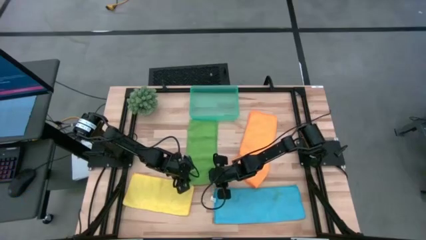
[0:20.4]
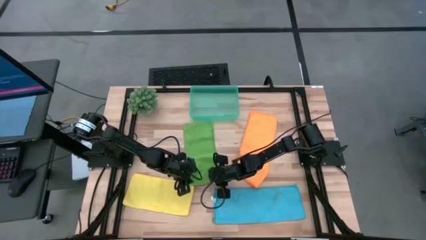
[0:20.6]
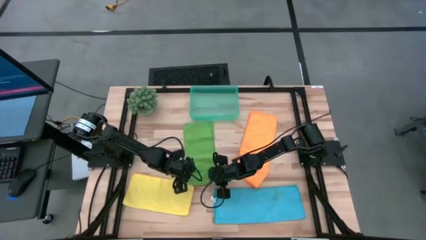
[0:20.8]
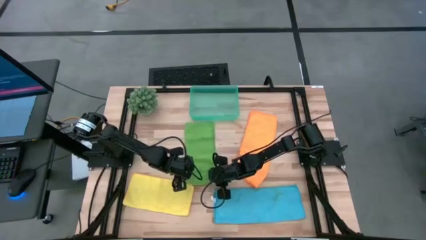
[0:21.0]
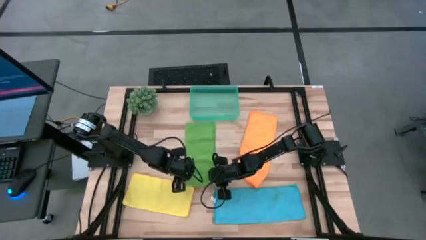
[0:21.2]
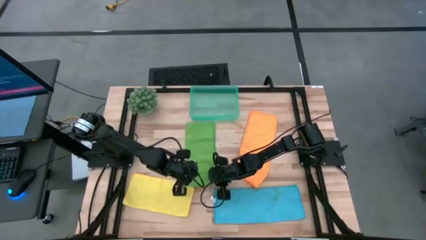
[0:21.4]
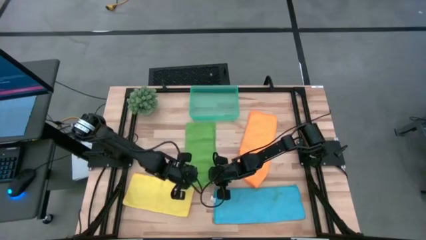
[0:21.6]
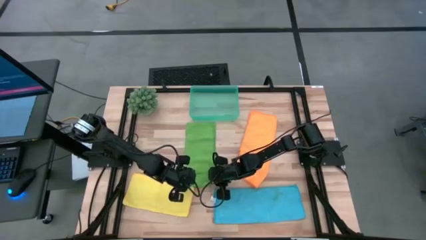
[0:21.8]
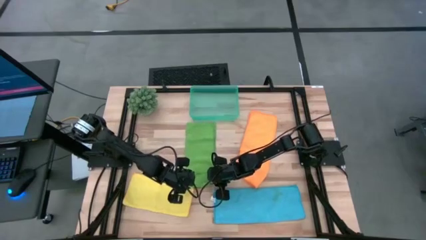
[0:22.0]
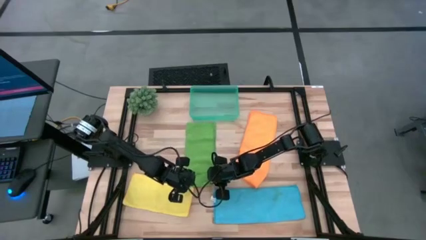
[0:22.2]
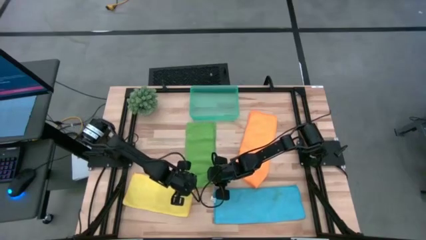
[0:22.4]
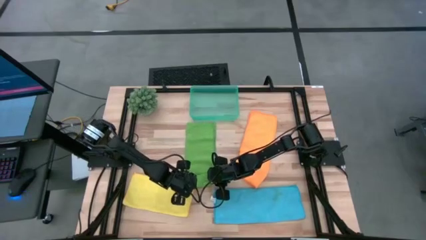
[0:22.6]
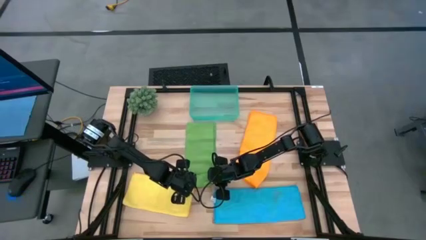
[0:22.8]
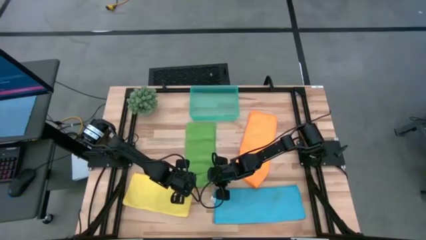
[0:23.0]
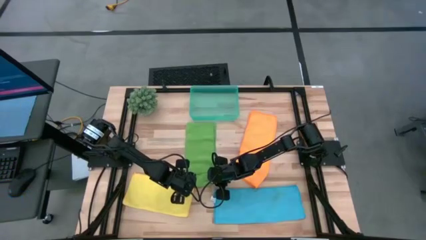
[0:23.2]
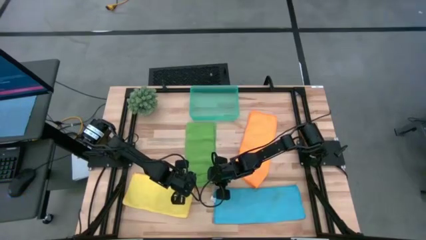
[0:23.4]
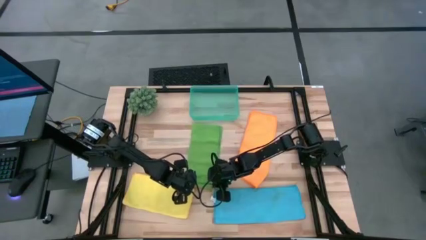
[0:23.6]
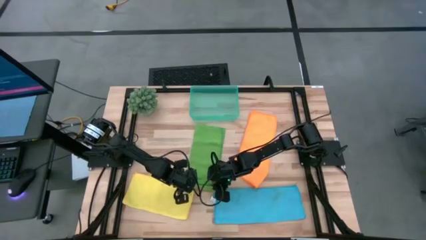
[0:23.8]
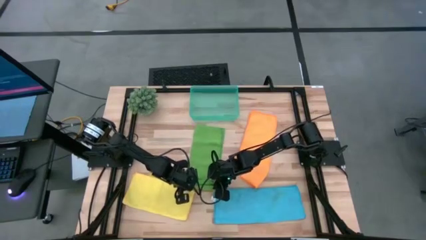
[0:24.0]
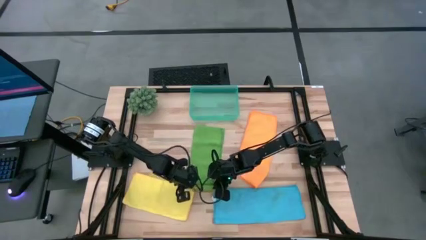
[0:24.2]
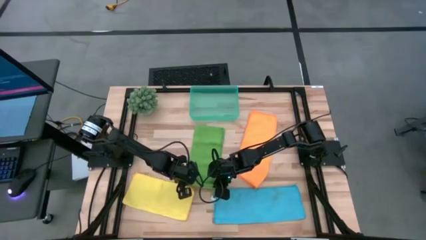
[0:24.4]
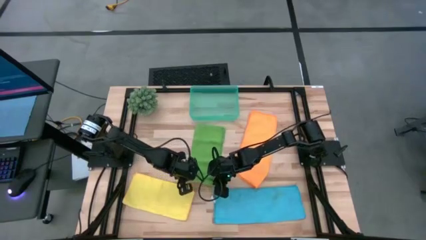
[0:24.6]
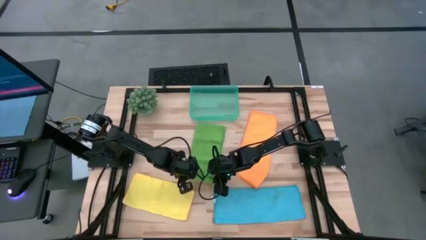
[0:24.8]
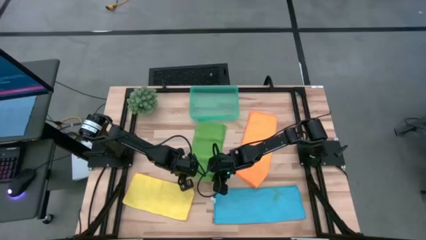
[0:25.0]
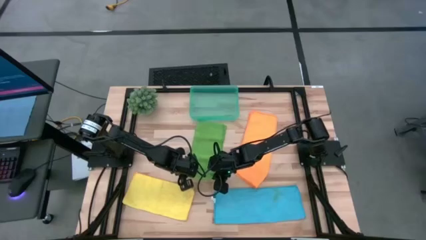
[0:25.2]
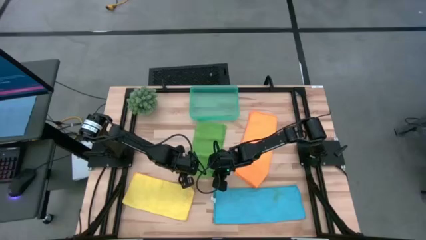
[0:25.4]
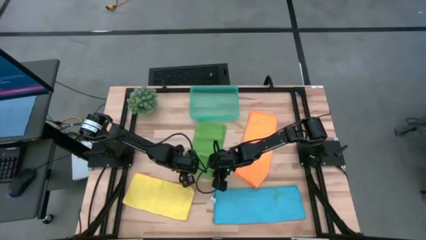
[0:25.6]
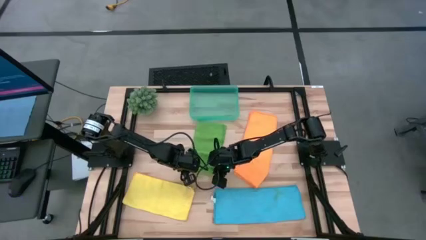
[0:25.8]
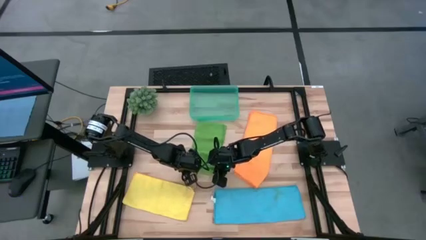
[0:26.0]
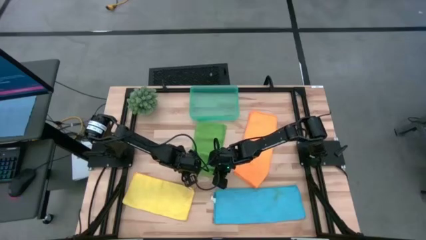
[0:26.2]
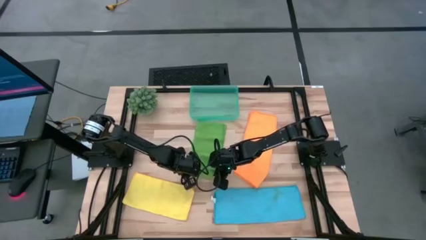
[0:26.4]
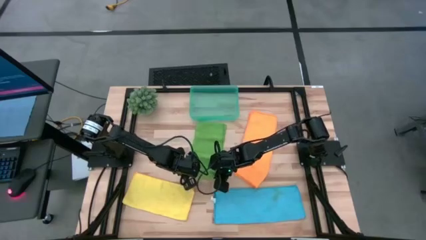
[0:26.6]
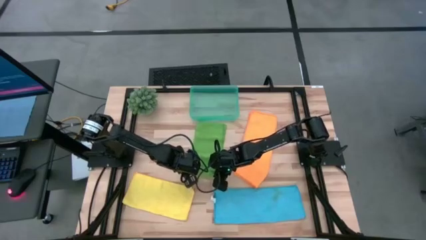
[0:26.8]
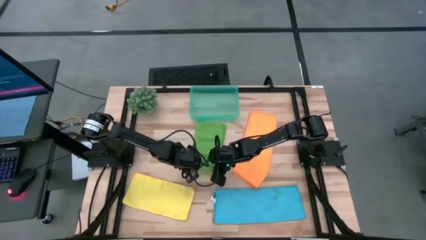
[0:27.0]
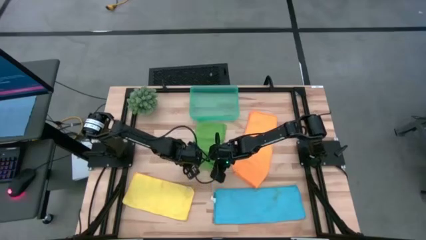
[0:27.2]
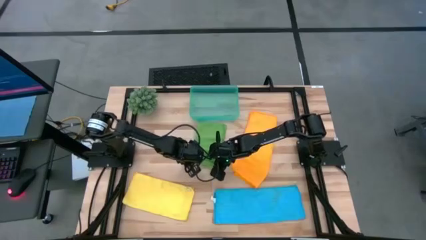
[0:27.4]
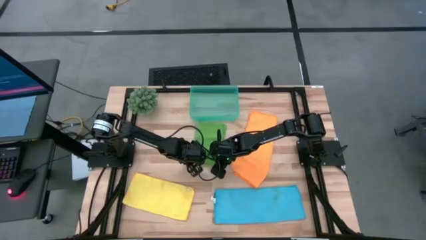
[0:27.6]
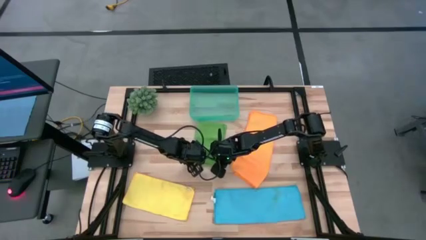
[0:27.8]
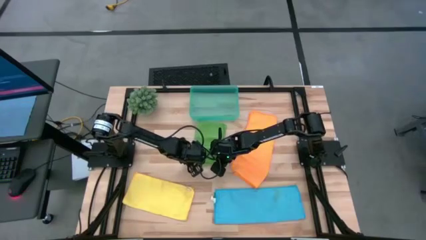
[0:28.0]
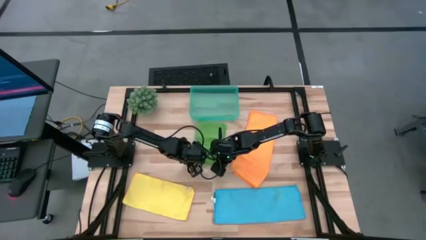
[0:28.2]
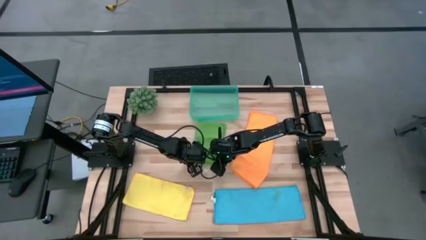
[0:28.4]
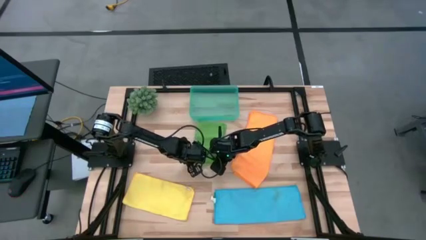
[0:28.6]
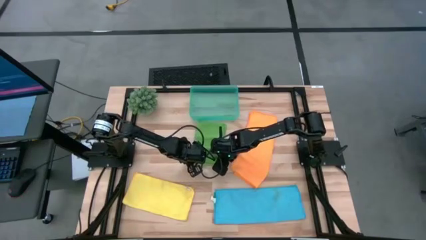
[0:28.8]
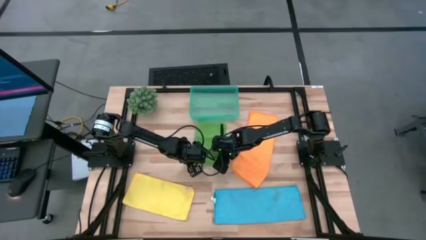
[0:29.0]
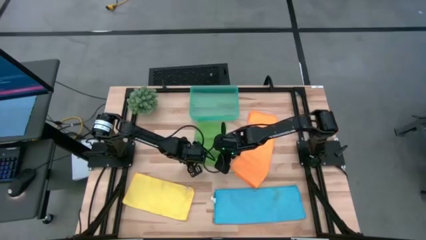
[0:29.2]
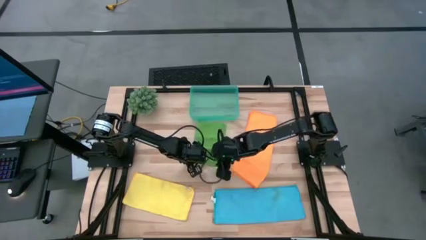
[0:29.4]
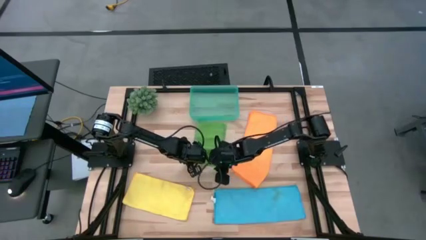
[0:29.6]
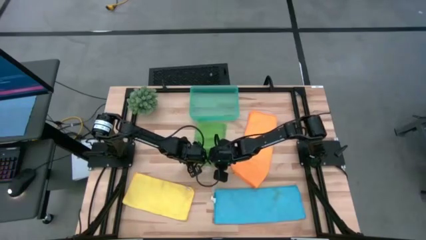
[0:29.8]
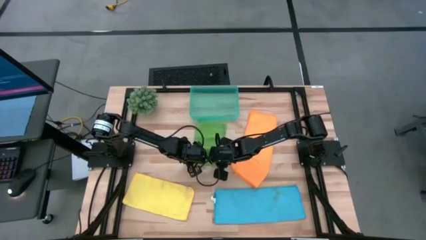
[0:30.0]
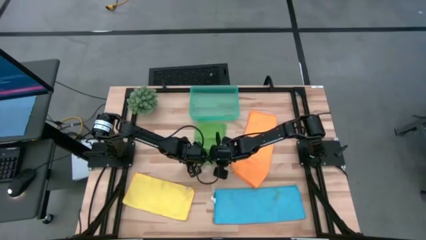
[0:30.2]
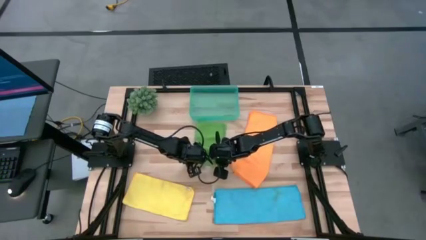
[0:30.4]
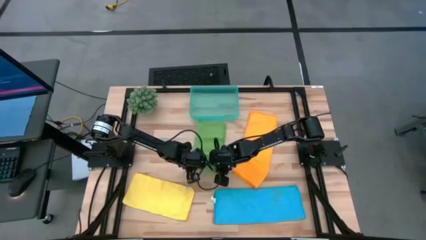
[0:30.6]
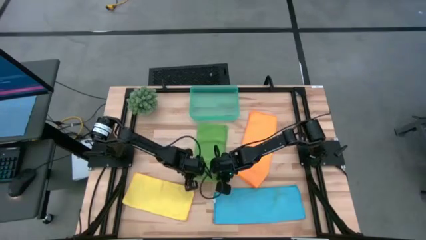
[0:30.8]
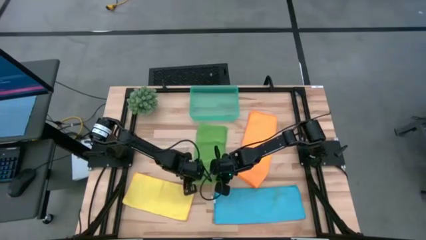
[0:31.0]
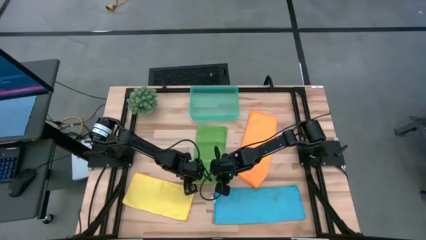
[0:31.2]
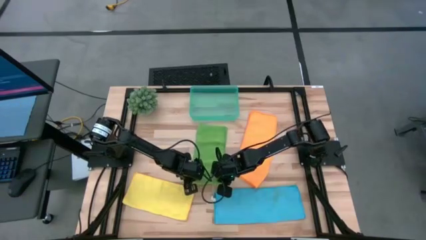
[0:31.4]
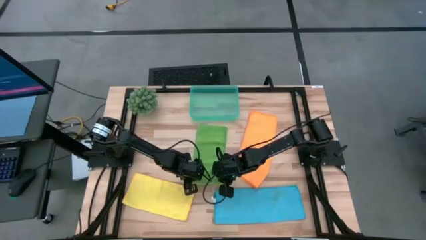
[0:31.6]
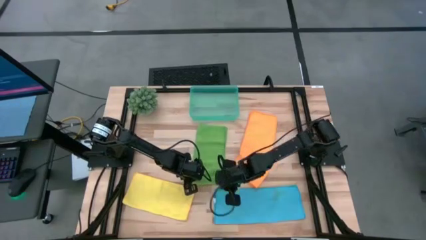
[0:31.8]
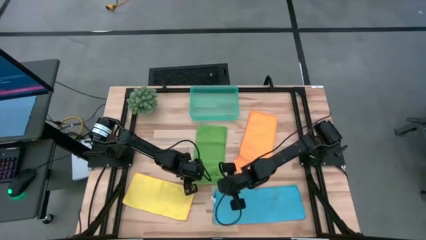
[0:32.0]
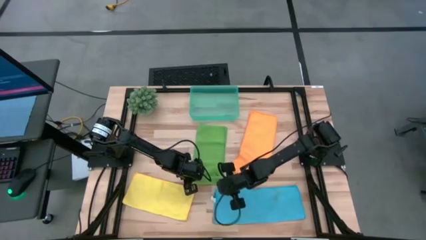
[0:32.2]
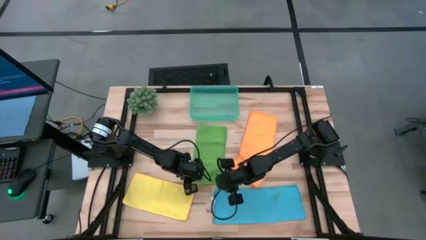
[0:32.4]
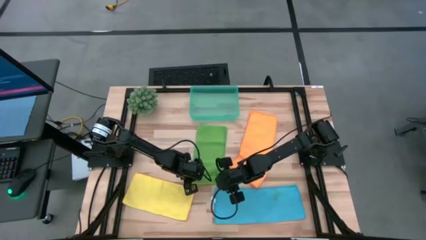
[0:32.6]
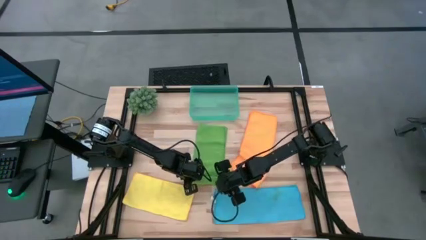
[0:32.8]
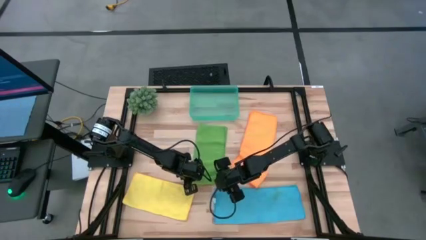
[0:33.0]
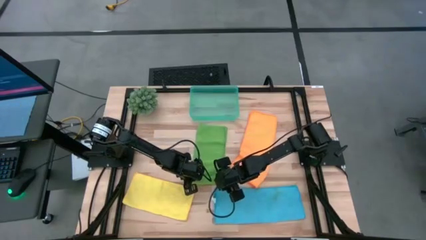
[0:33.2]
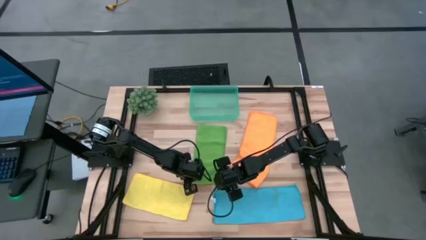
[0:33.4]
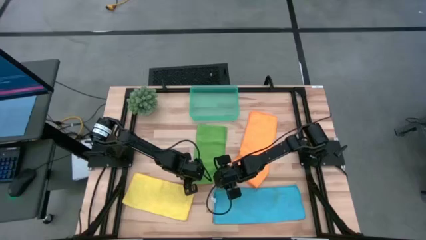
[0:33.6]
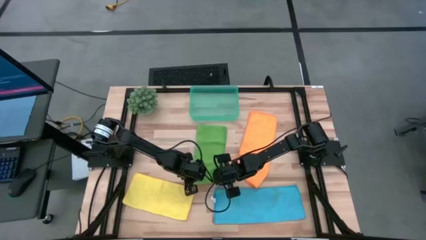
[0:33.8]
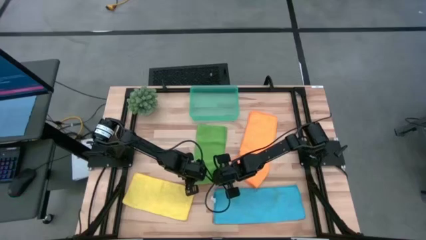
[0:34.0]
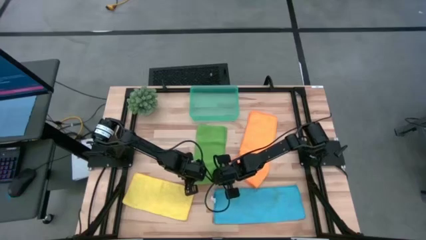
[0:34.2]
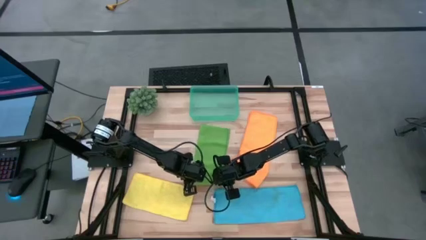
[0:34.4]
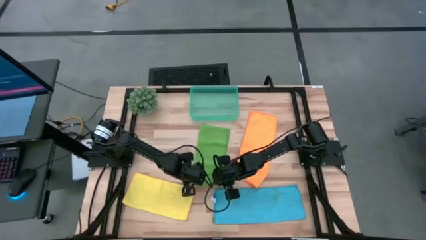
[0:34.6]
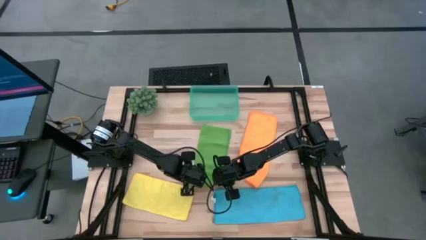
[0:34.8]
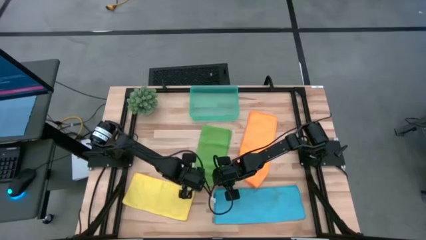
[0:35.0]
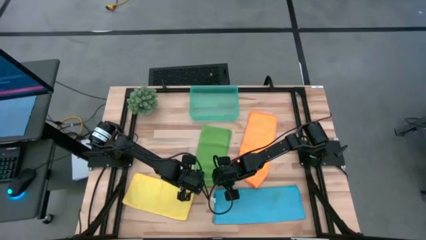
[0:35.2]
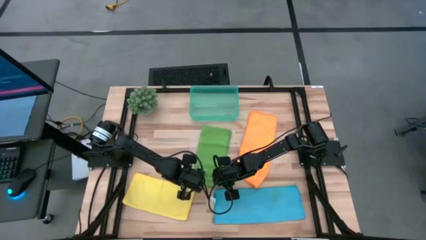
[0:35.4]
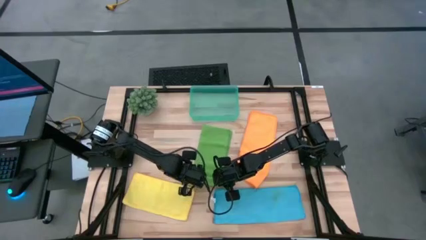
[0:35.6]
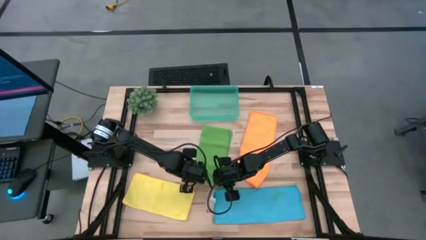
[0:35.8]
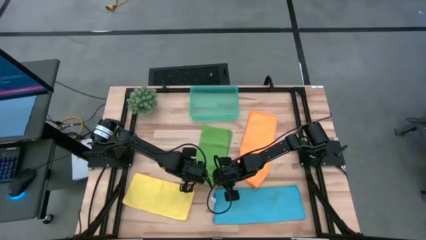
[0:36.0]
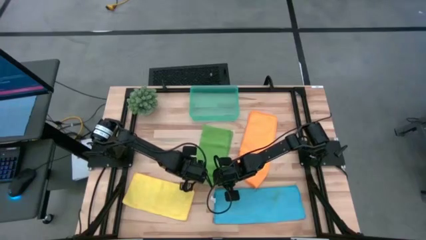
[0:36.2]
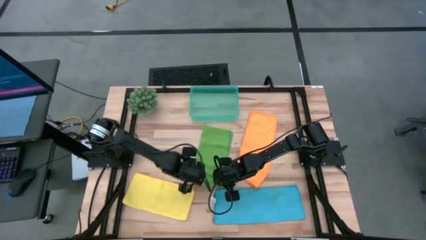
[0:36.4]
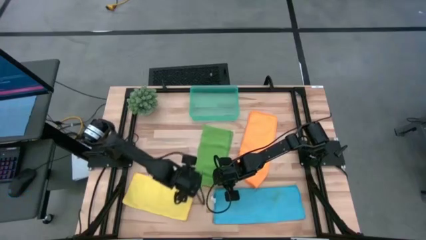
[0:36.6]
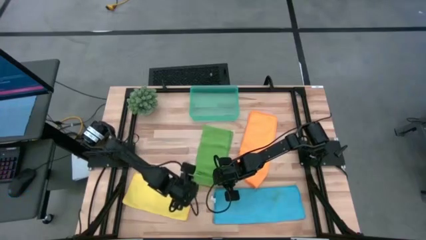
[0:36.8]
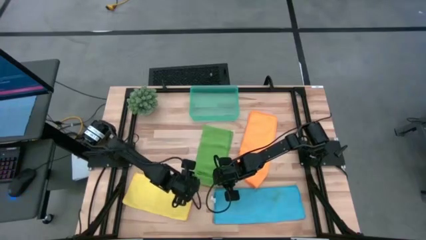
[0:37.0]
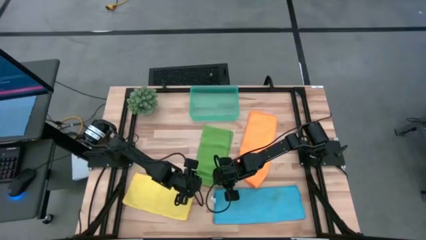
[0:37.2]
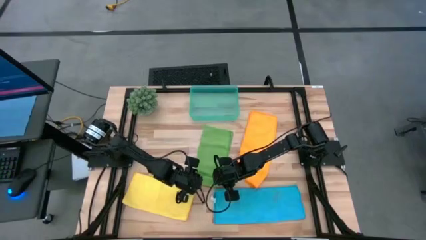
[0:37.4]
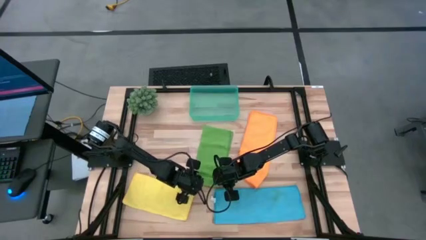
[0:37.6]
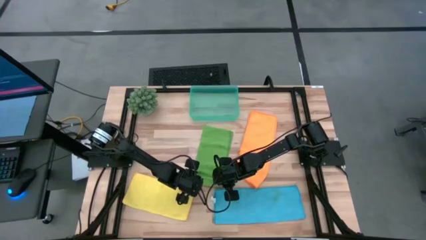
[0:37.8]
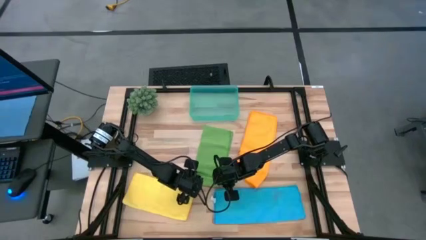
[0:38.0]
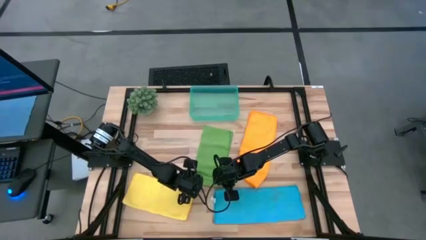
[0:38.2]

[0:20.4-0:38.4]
Task: Roll microfiber towels into tight, uniform cylinder then place into a basket
Roll the green towel
